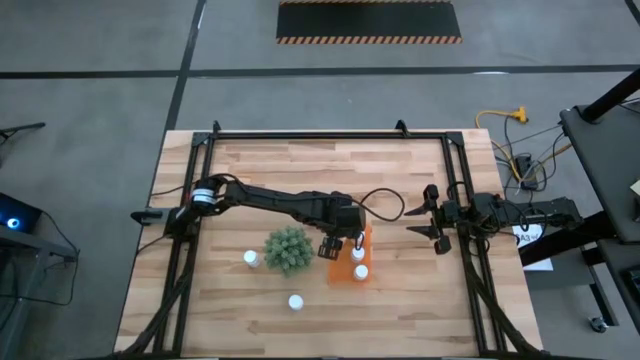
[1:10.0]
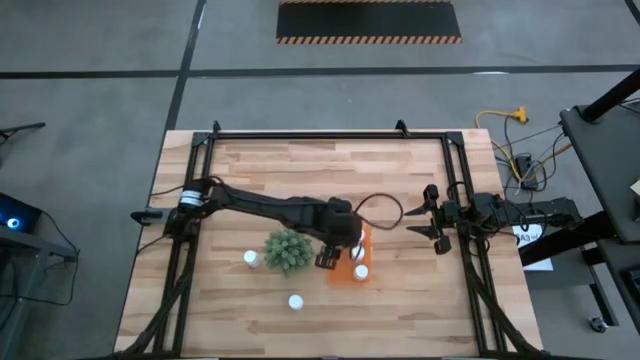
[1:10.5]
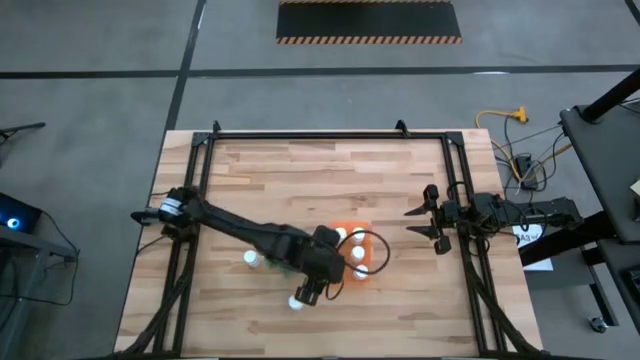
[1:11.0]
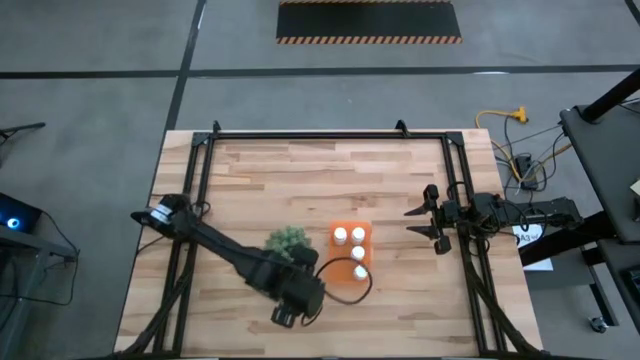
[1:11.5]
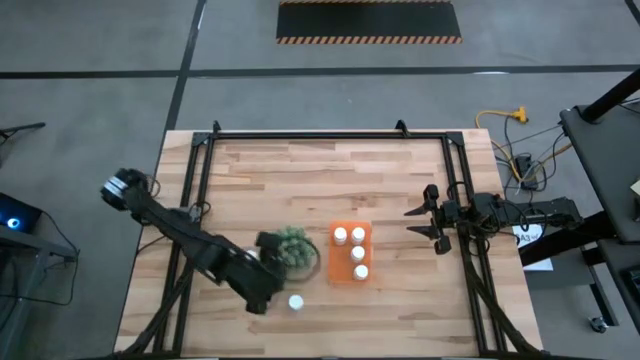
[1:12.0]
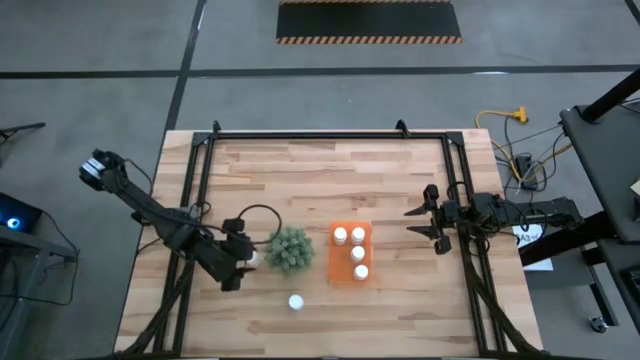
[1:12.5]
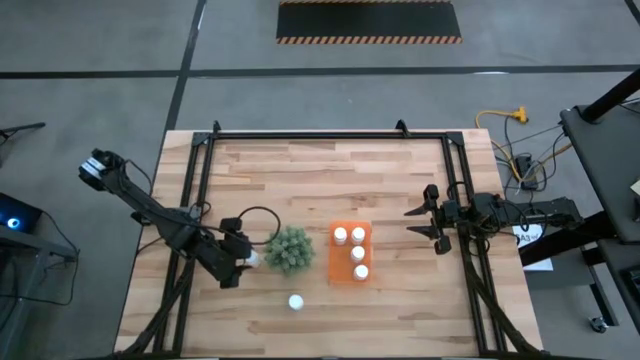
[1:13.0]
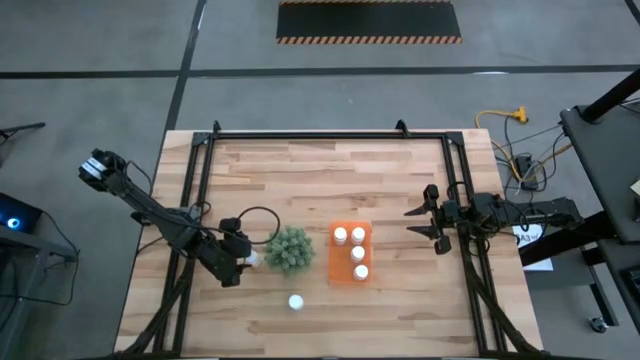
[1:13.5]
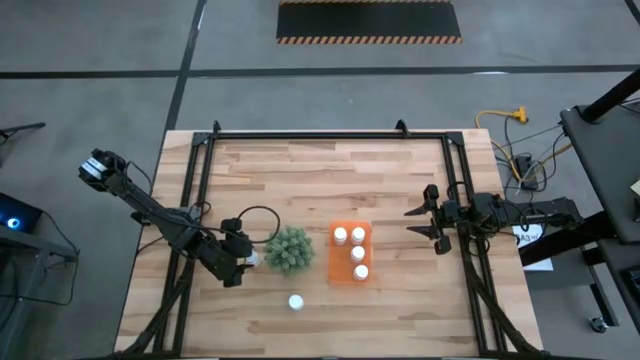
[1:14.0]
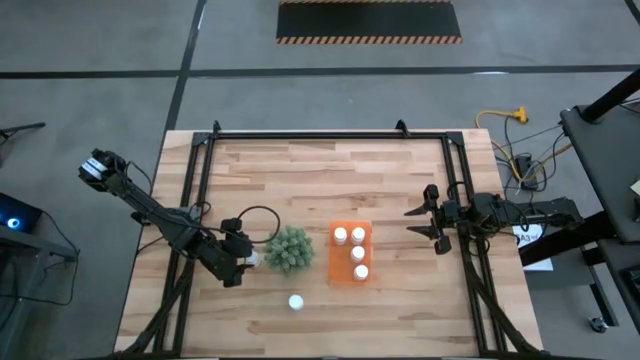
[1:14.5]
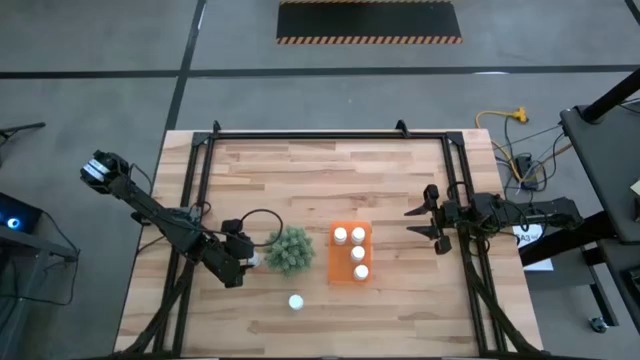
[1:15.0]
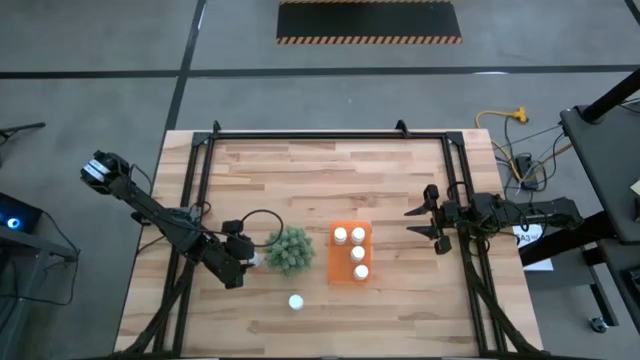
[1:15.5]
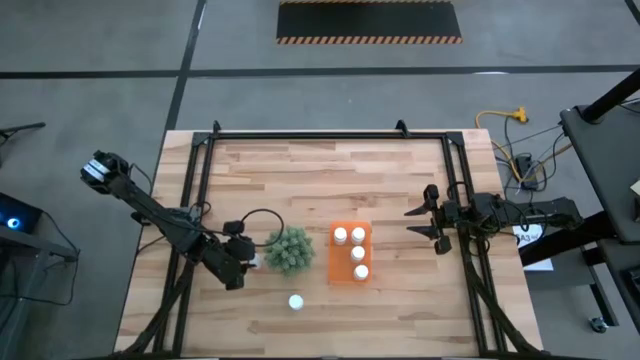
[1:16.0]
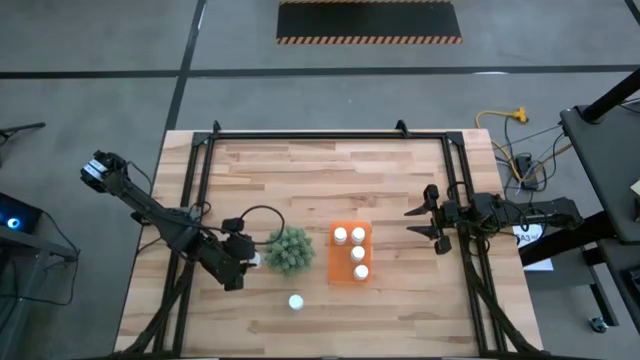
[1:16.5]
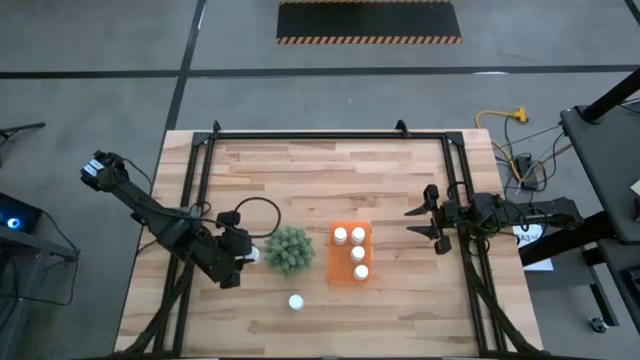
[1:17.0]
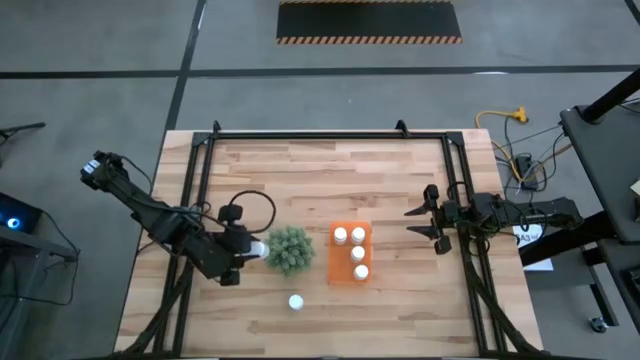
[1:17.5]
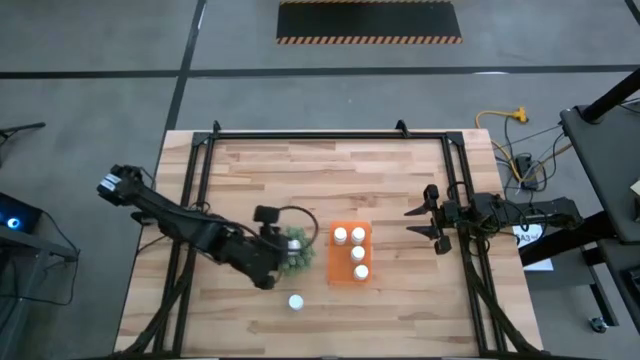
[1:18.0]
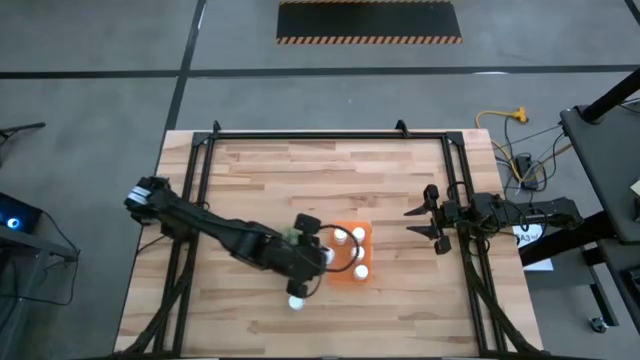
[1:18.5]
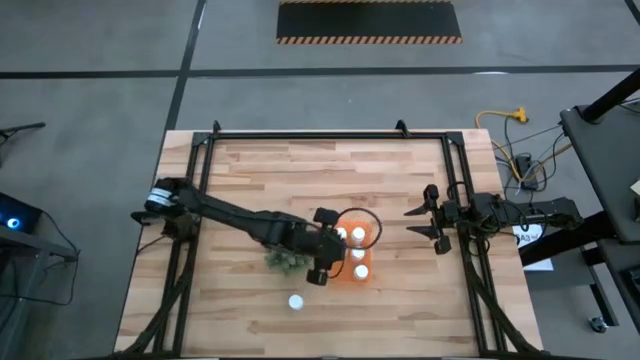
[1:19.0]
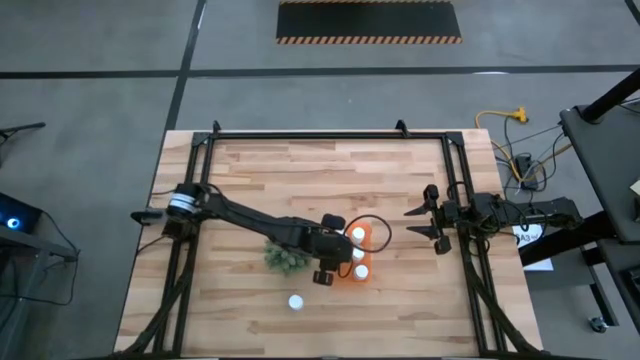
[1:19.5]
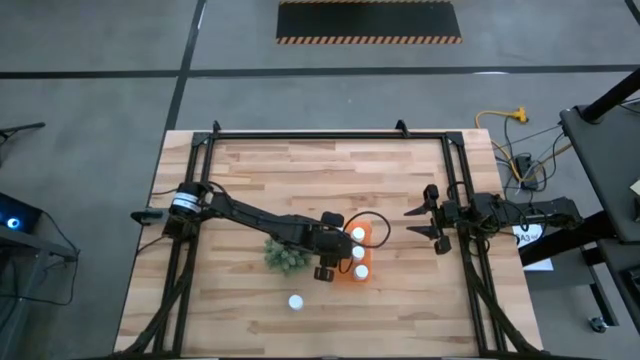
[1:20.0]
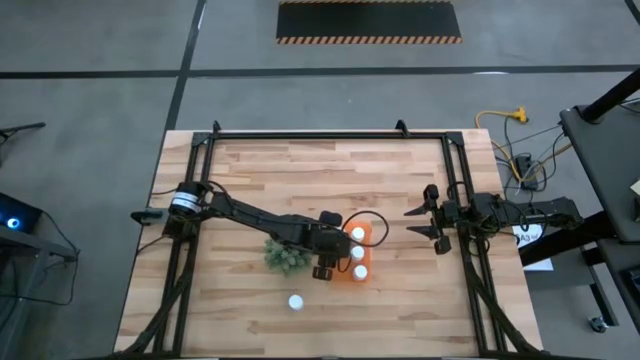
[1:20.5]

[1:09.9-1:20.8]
Task: Pick and place pill bottles into a basket
Put the white medicine bottle into the orange bin

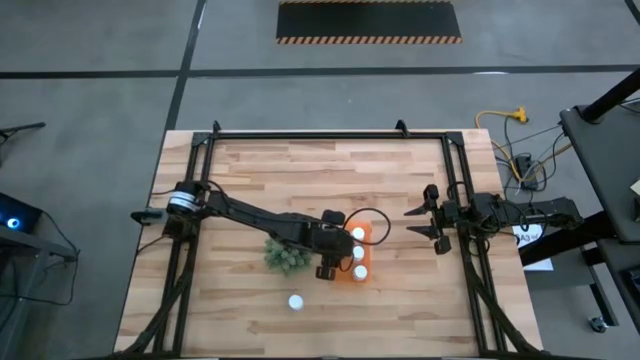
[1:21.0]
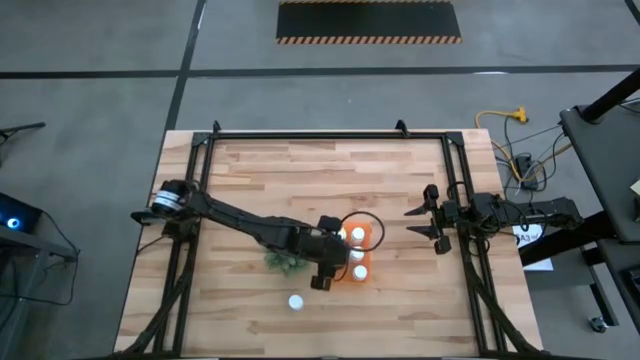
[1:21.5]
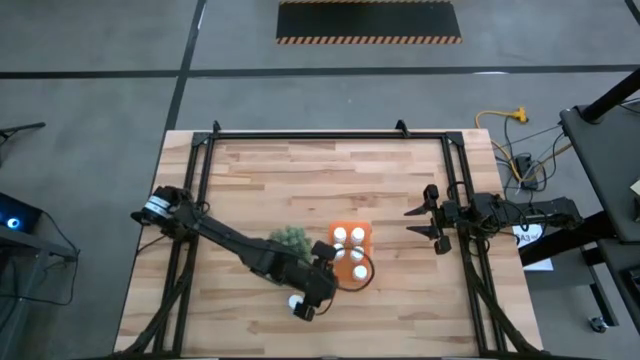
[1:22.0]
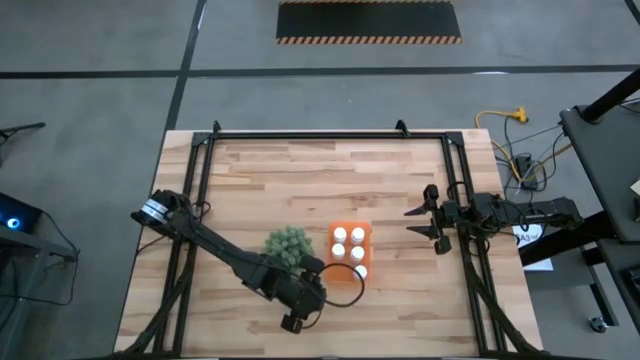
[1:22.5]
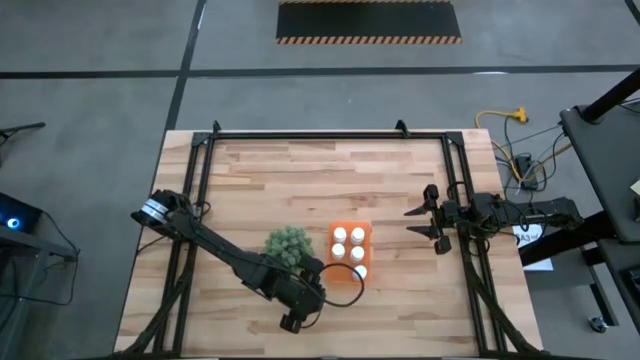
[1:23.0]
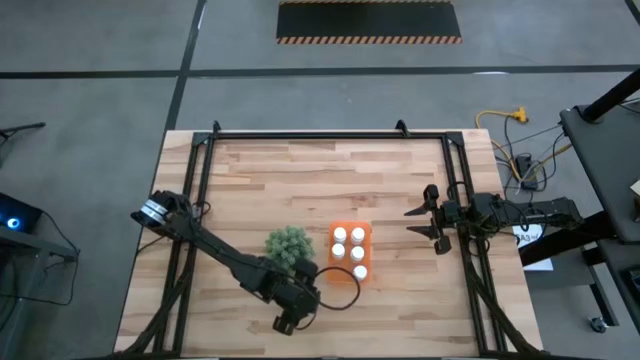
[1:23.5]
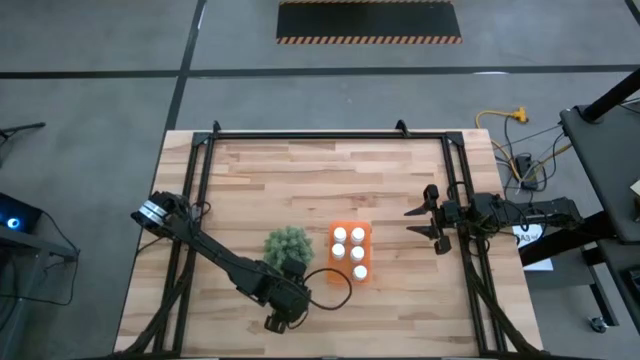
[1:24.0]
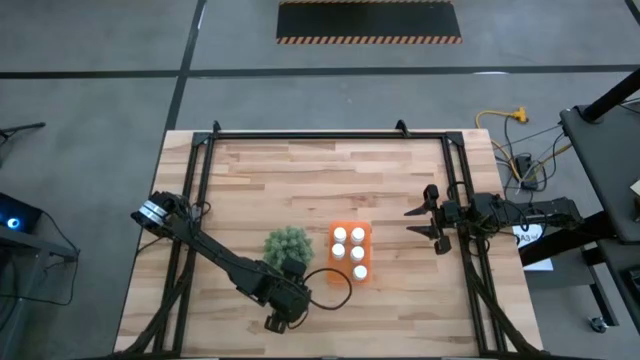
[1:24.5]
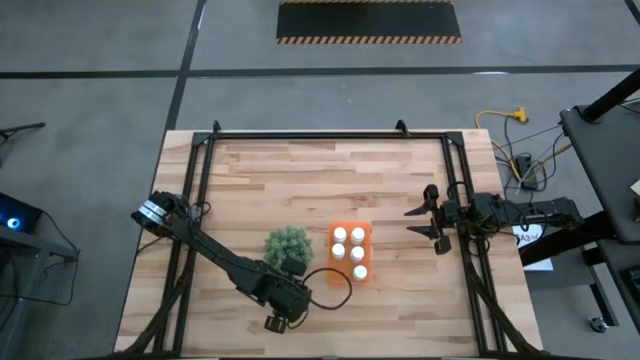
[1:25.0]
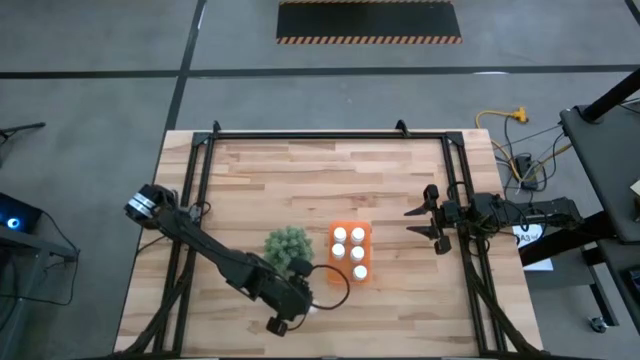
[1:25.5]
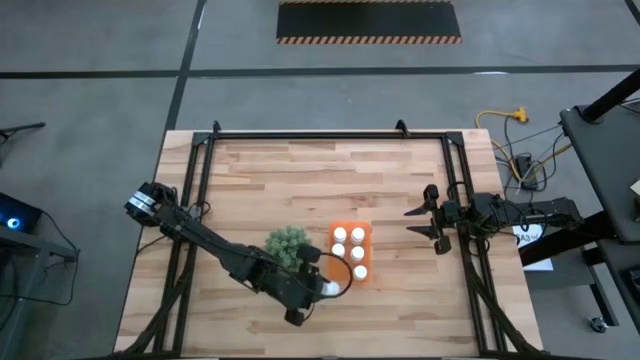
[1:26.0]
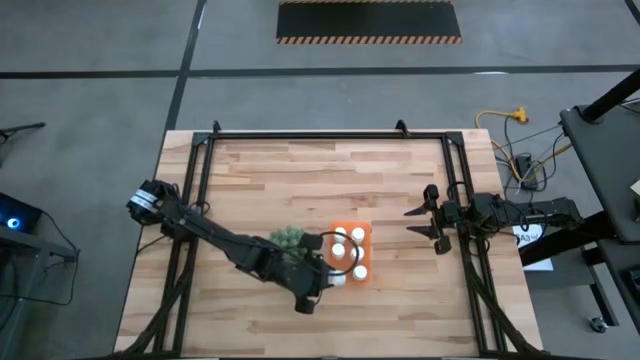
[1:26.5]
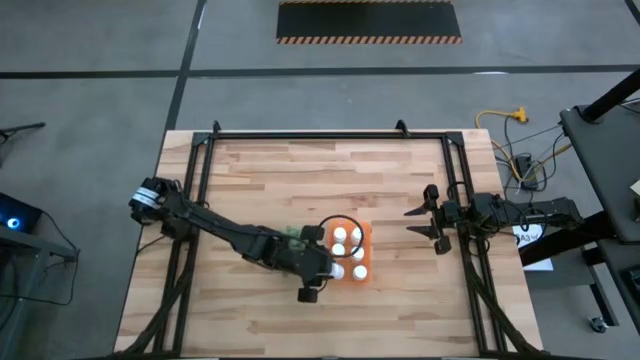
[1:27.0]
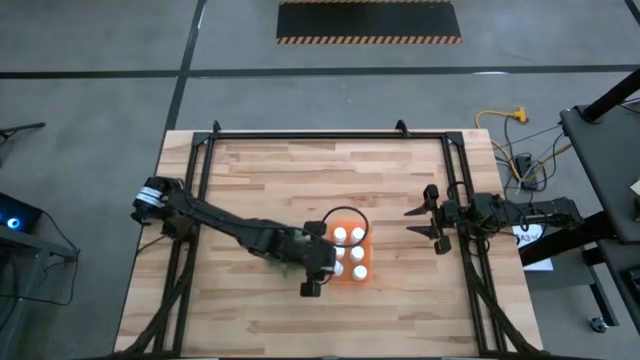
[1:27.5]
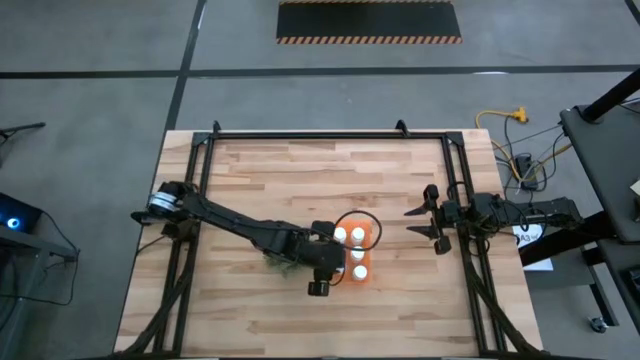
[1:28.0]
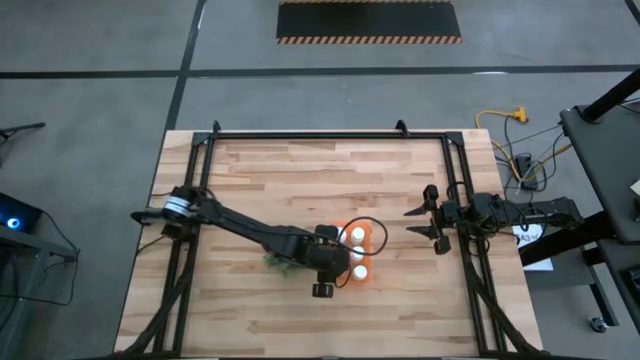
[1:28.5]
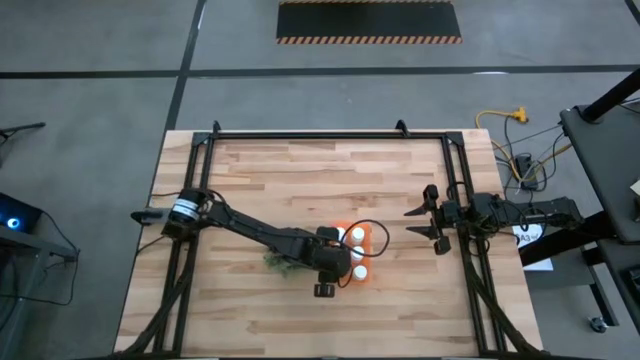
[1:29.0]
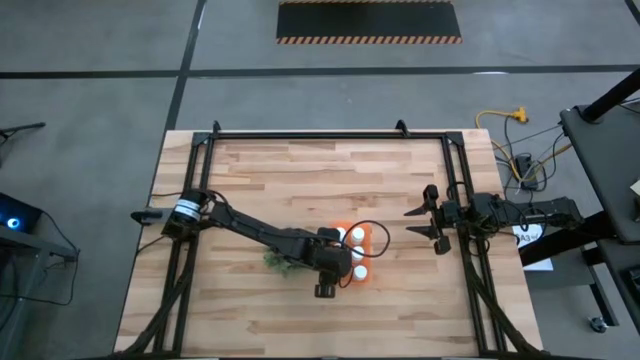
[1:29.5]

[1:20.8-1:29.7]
Put the white medicine bottle into the orange bin
